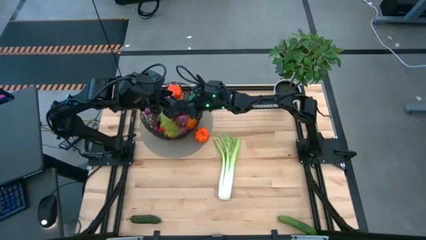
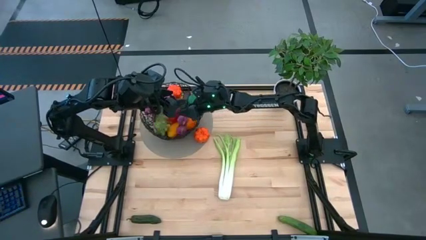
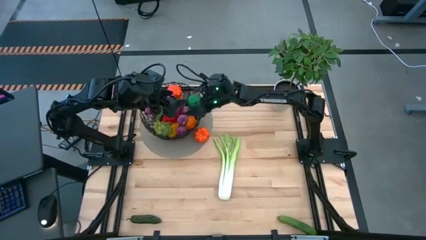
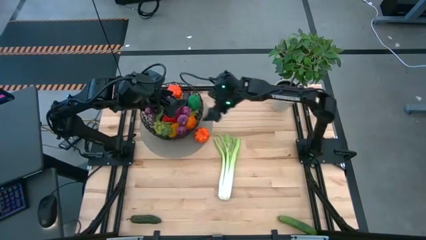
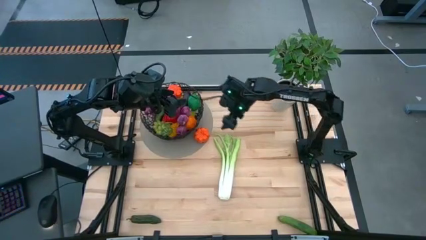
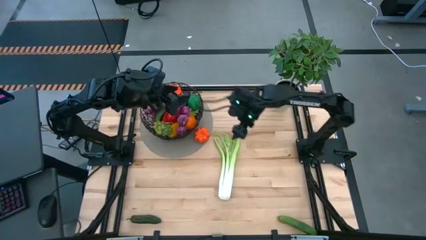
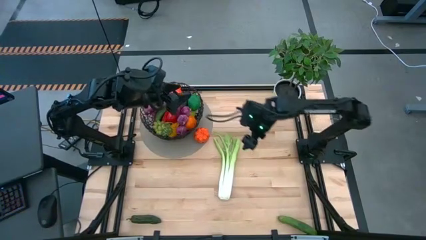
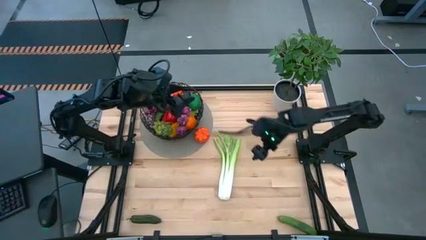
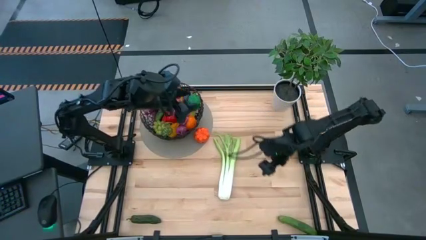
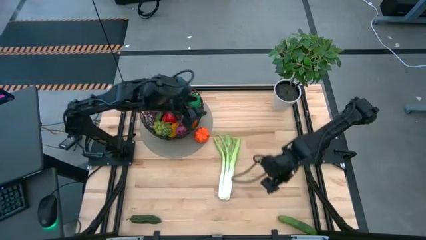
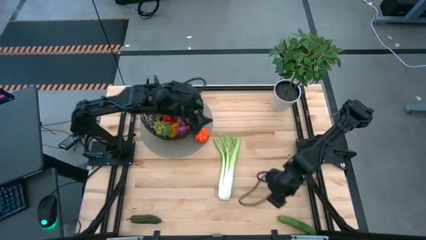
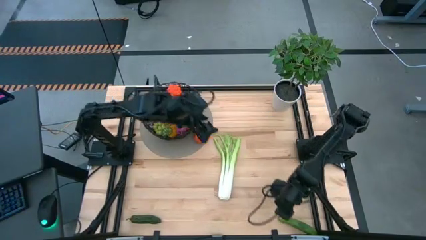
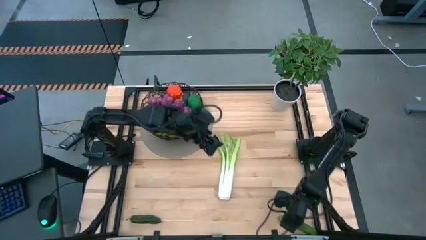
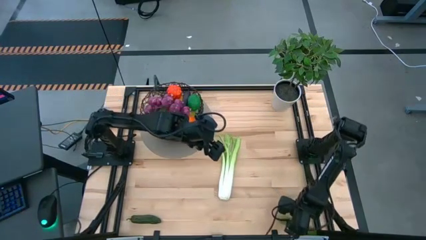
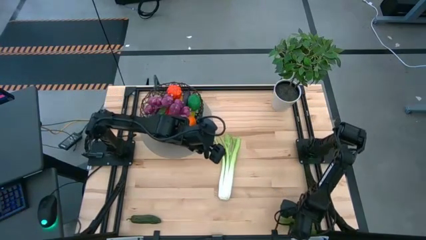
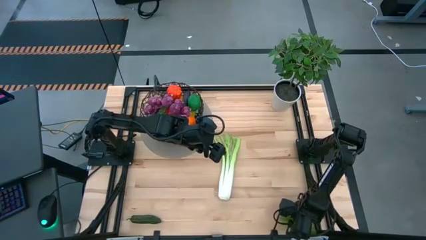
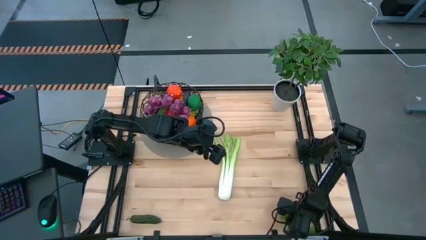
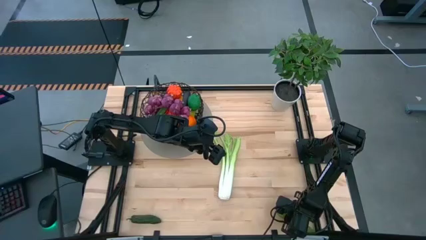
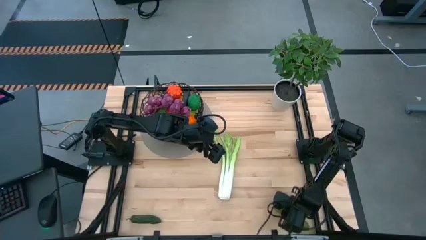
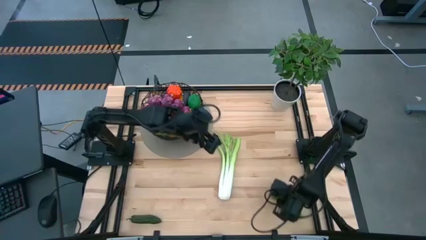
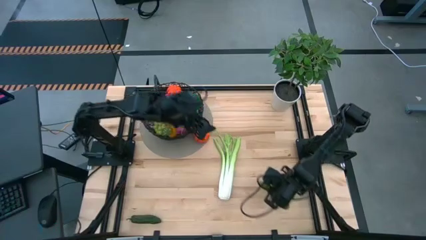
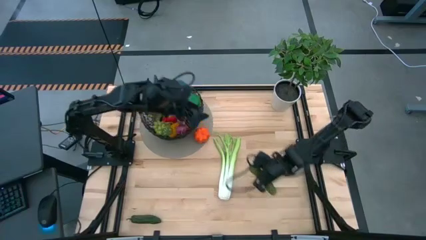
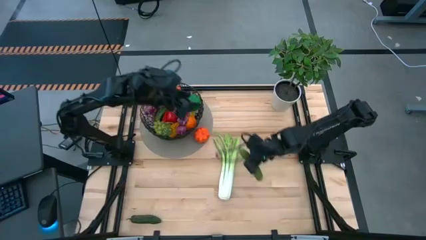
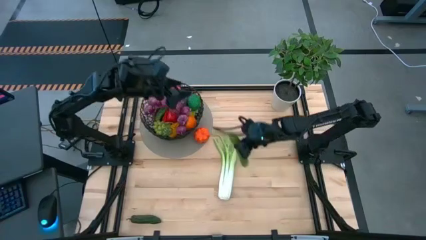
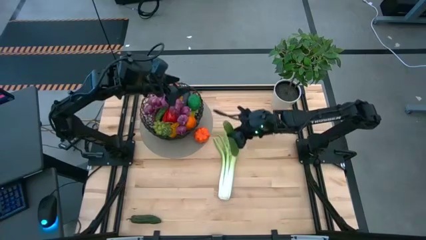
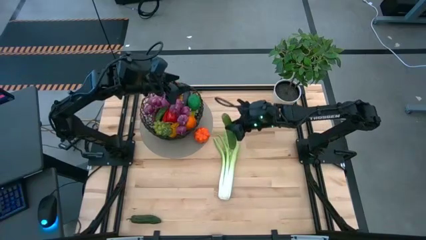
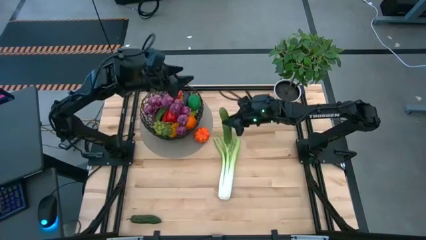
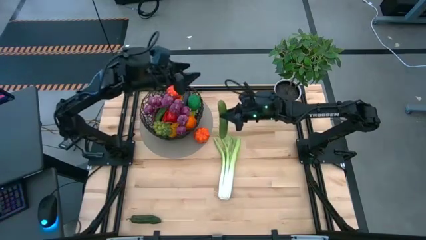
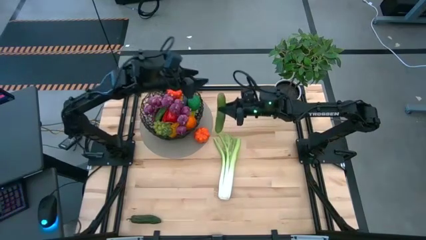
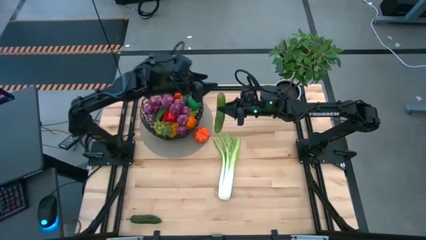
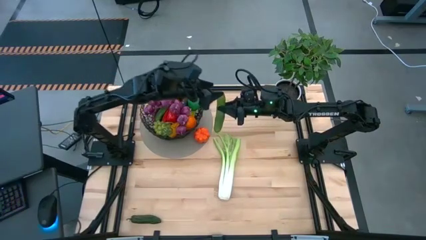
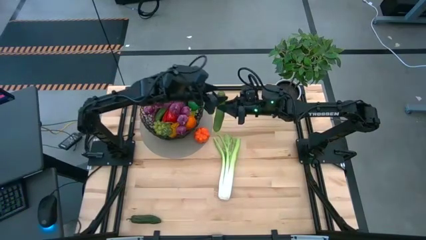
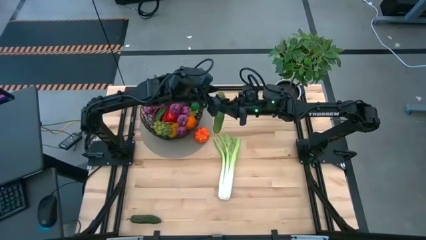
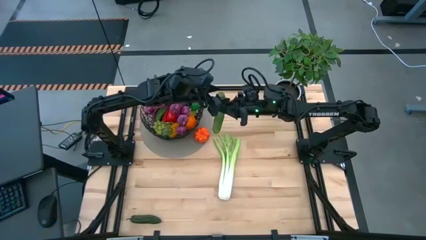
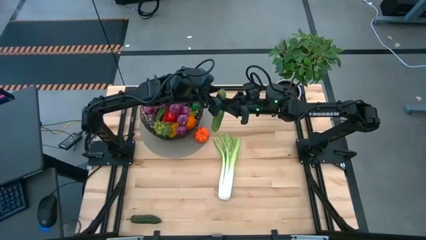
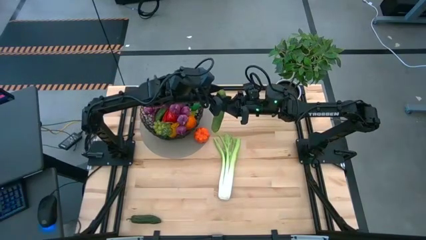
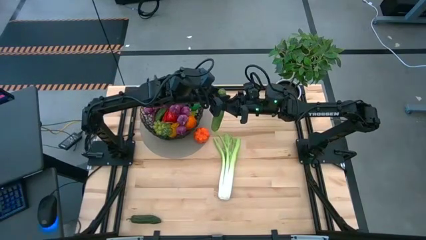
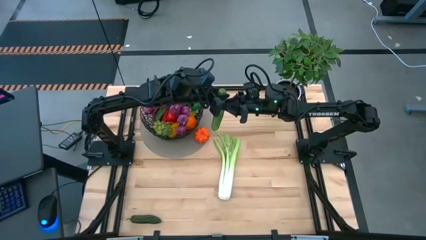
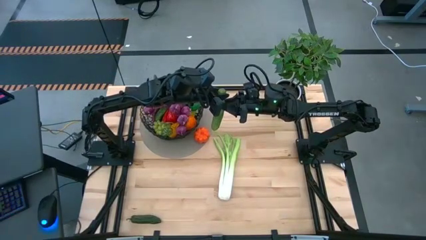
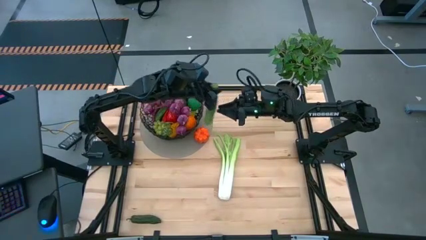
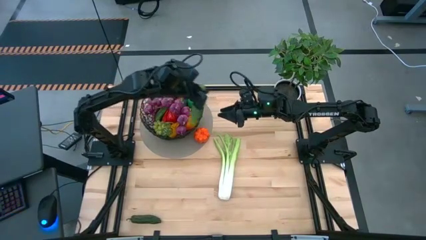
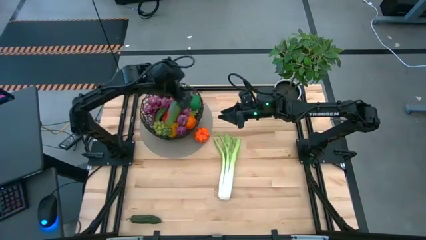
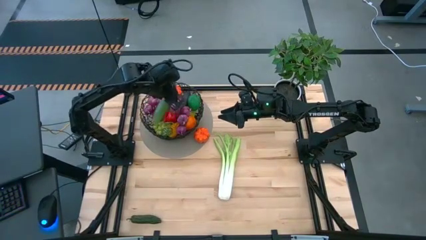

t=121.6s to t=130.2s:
Task: Build produce basket
Put the green cucumber into the wire basket

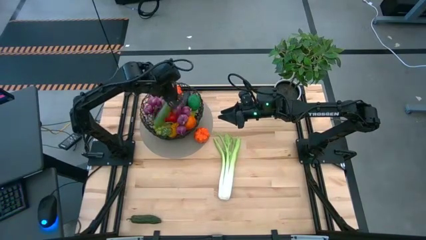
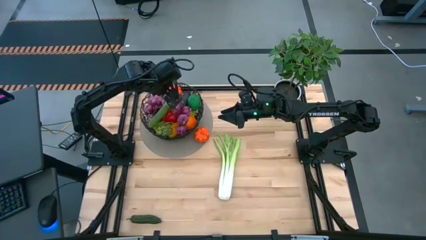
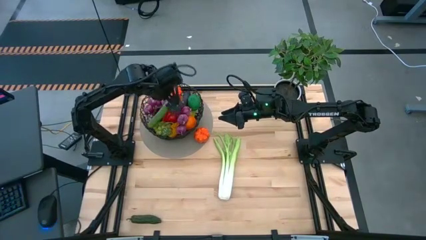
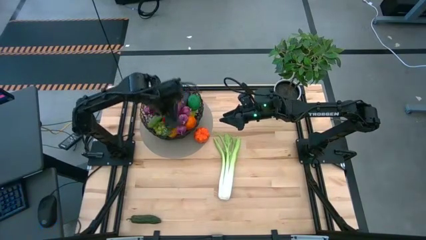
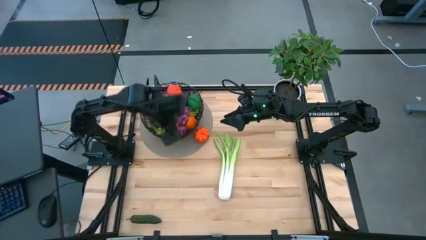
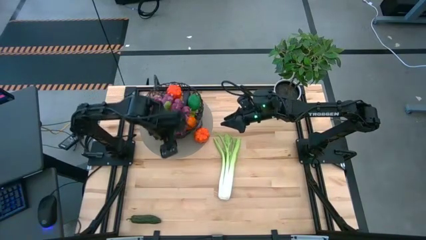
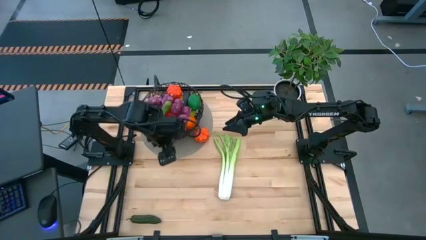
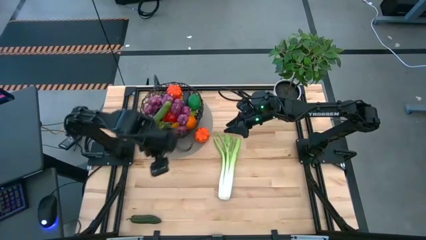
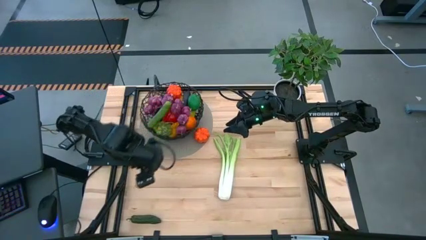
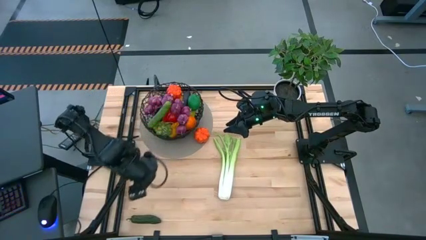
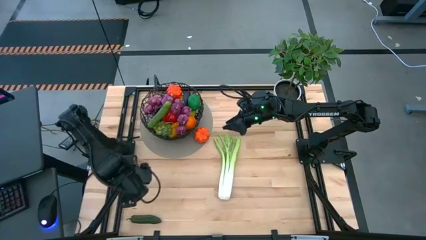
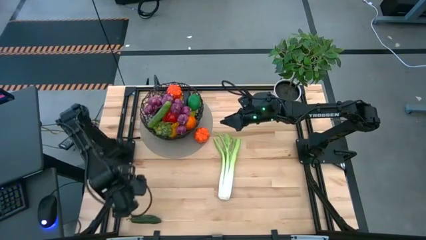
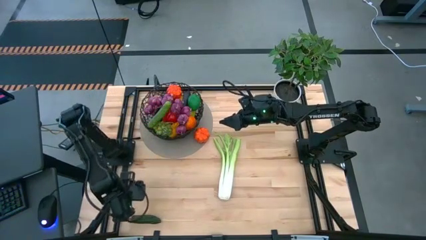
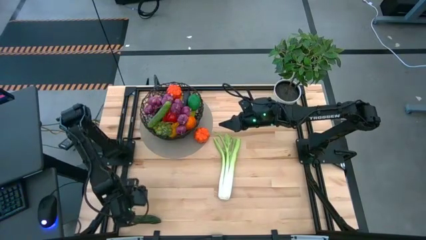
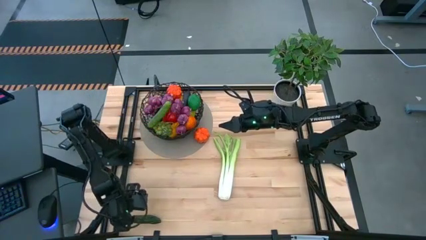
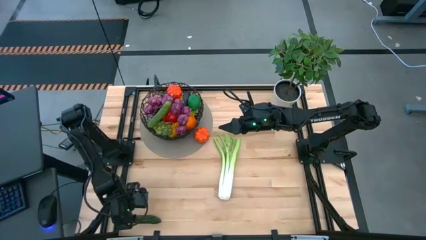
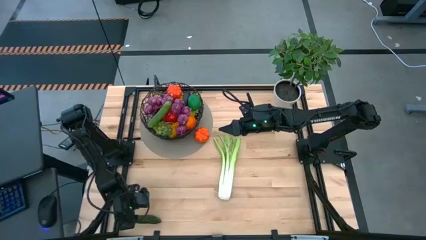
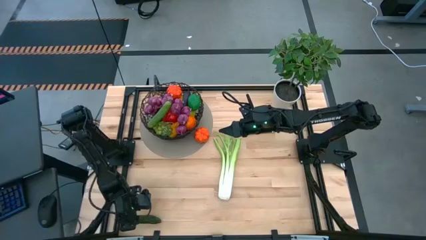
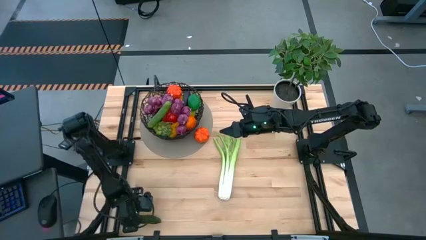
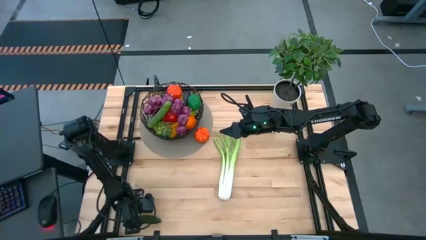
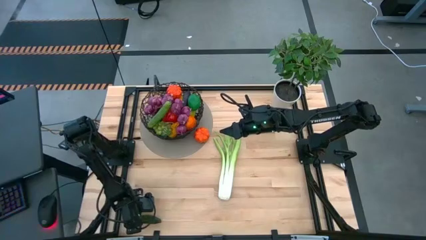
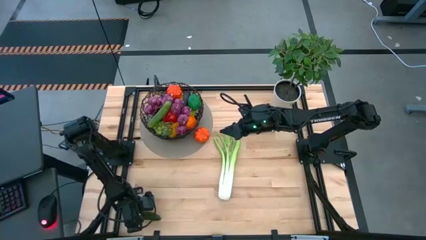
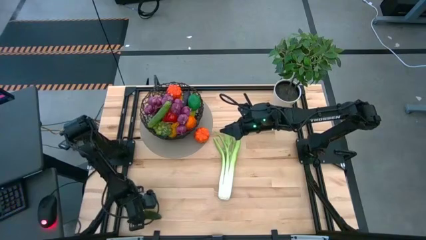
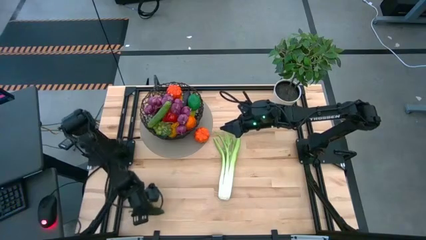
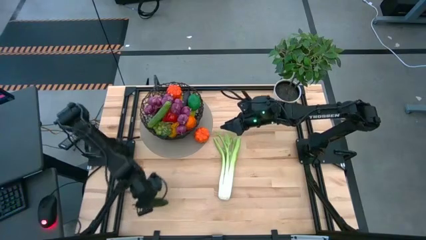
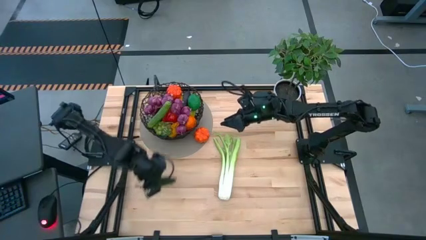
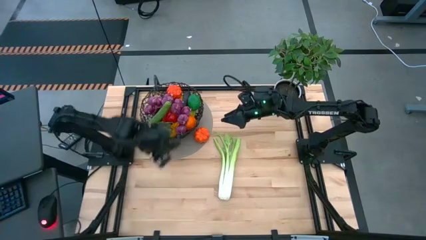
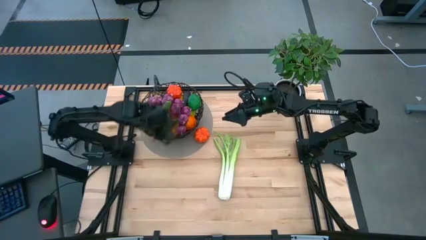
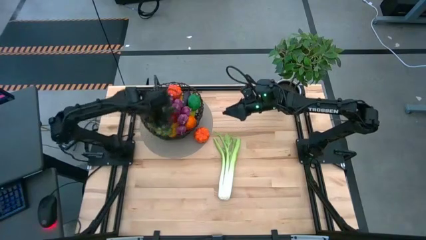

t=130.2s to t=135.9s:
Put the green chili pepper into the wire basket

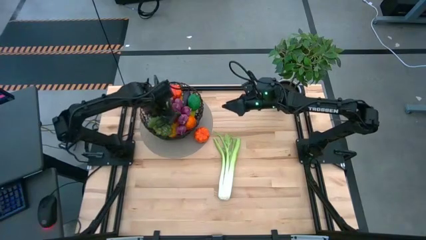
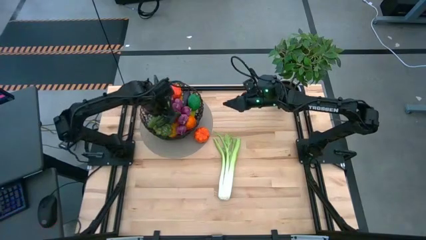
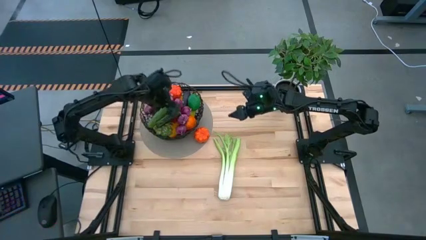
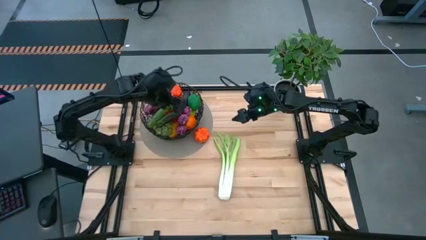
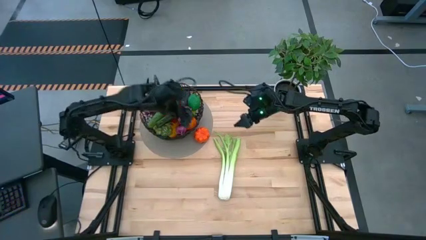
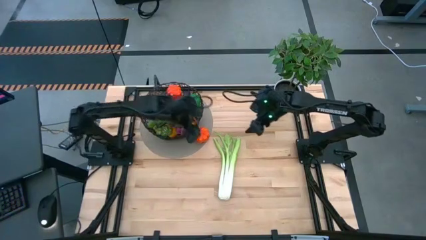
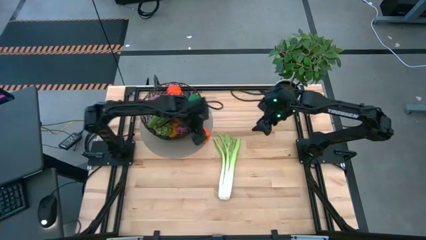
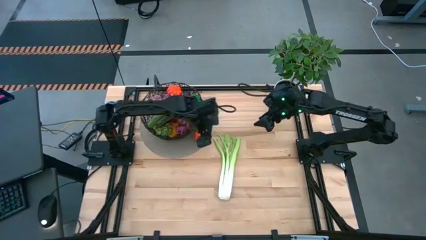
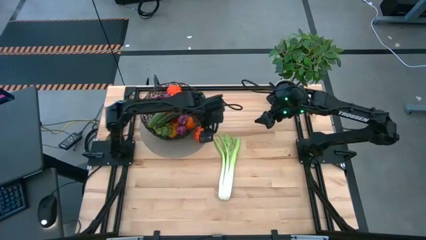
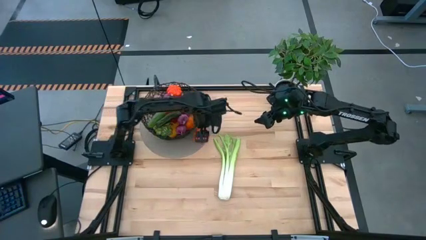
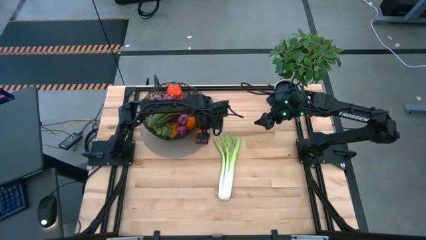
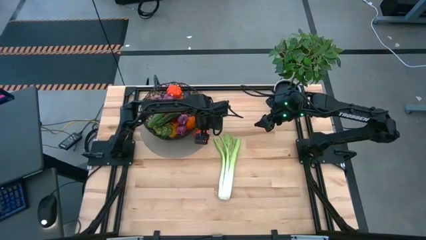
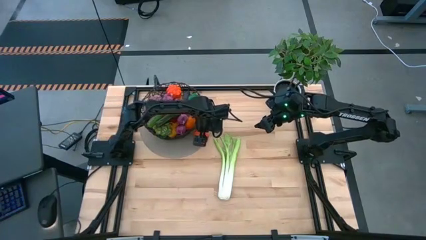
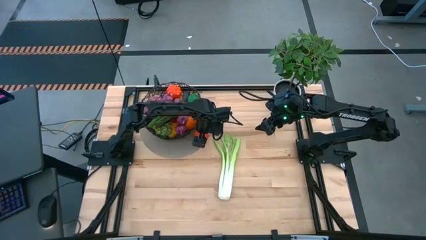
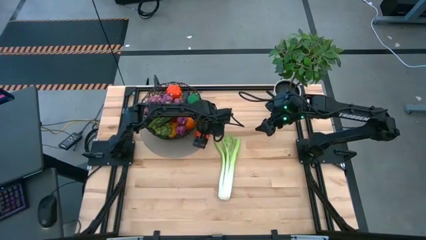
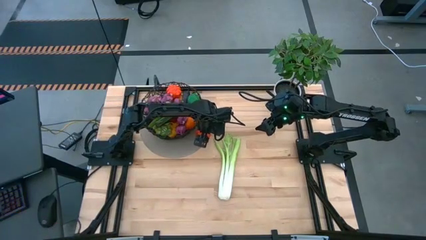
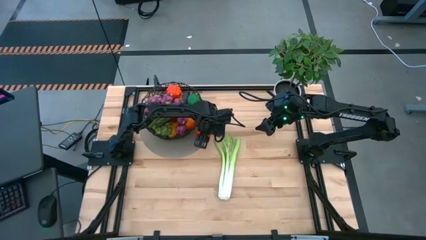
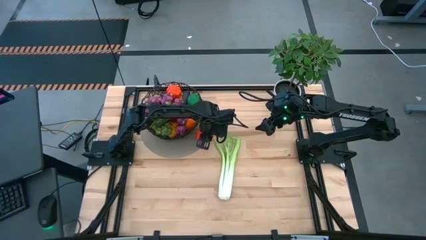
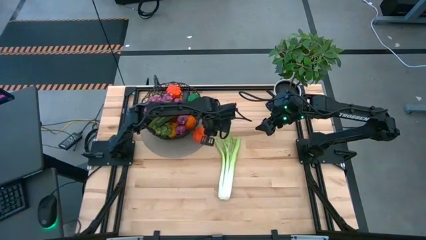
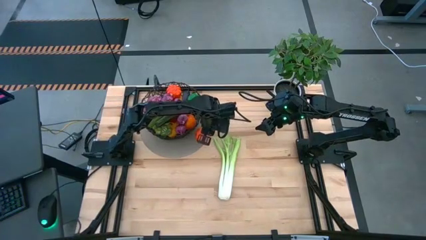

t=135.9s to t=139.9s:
Put the orange pumpkin into the wire basket
